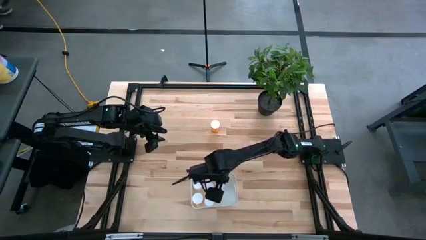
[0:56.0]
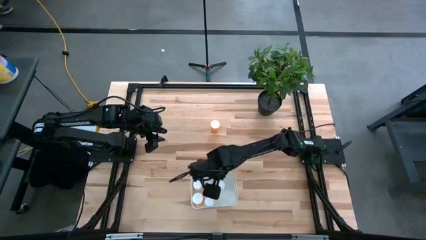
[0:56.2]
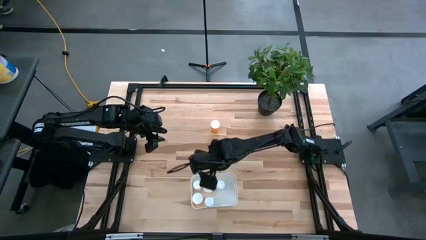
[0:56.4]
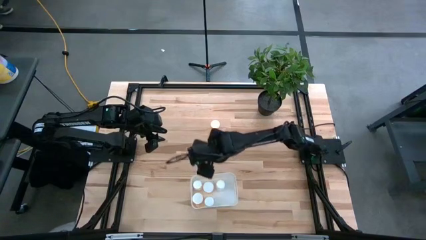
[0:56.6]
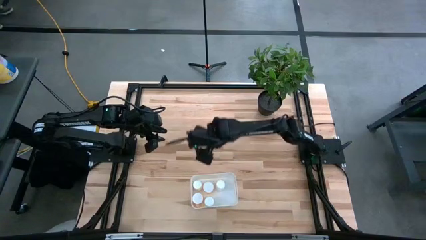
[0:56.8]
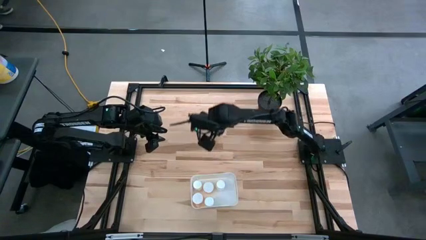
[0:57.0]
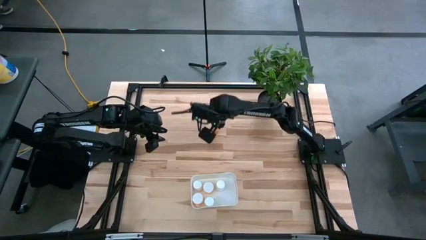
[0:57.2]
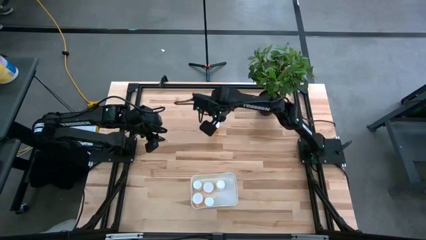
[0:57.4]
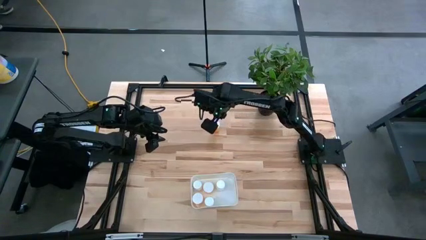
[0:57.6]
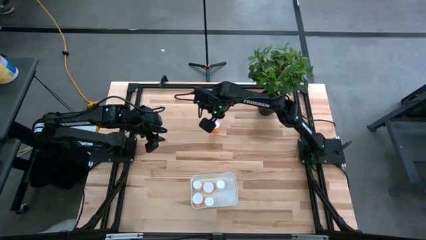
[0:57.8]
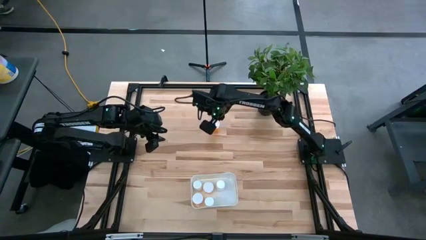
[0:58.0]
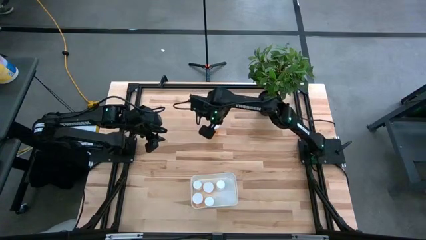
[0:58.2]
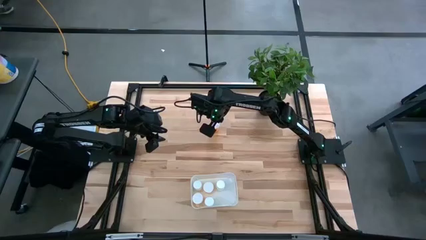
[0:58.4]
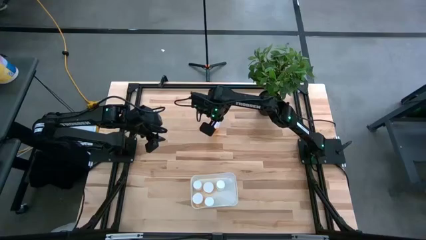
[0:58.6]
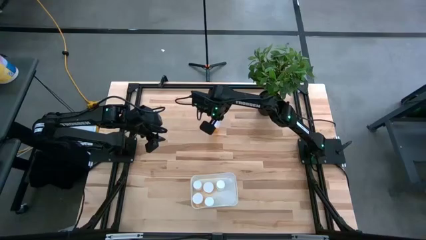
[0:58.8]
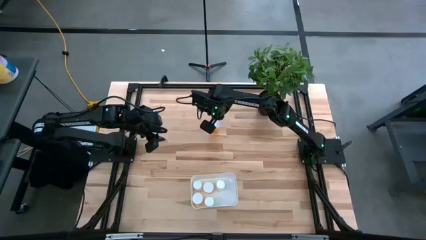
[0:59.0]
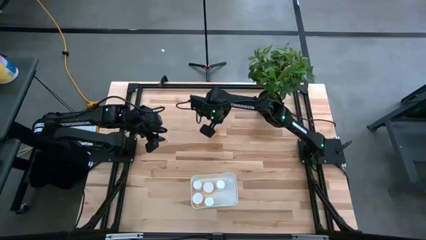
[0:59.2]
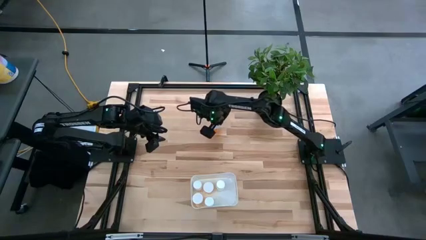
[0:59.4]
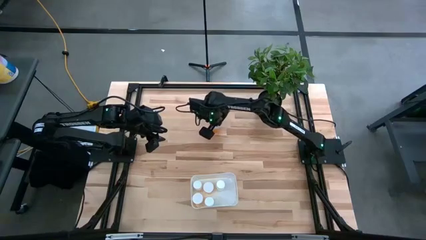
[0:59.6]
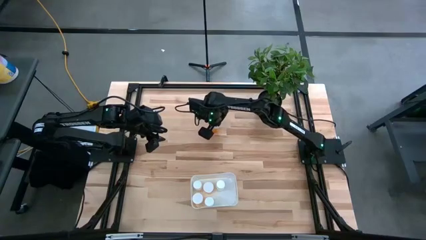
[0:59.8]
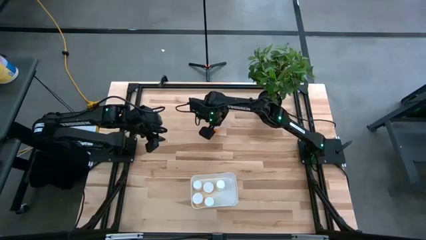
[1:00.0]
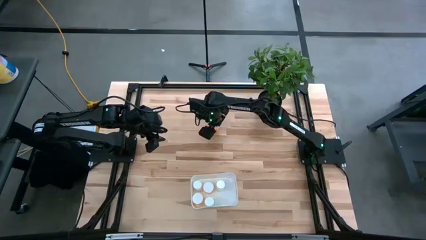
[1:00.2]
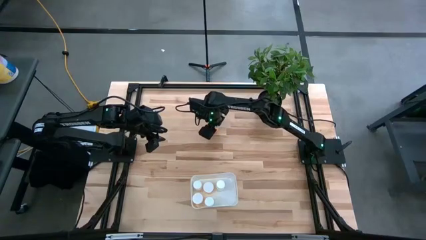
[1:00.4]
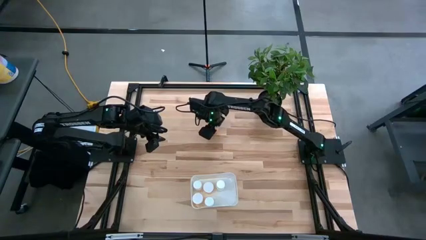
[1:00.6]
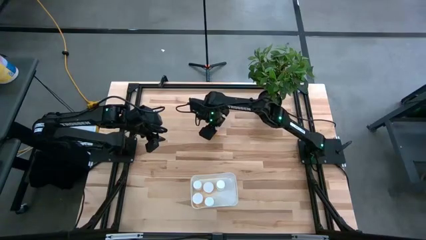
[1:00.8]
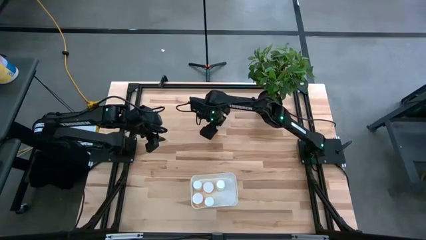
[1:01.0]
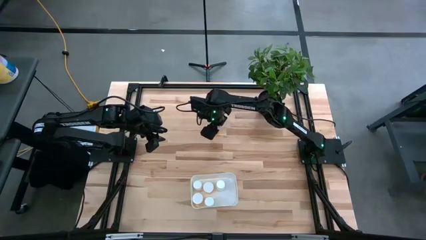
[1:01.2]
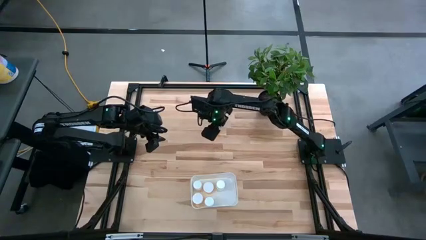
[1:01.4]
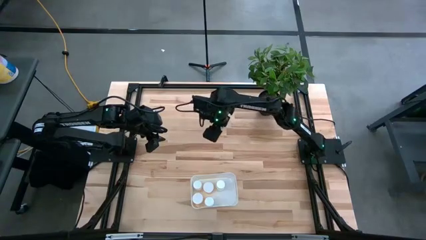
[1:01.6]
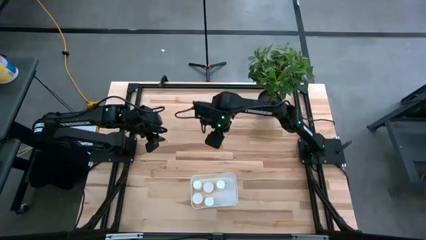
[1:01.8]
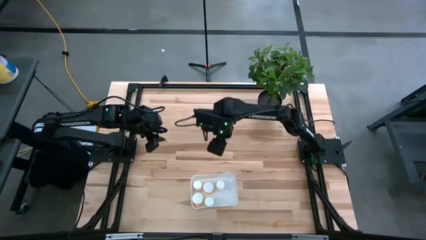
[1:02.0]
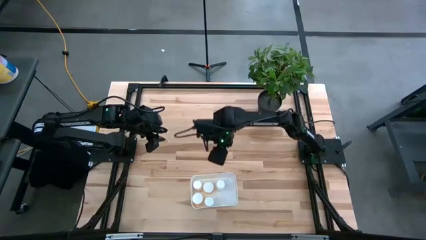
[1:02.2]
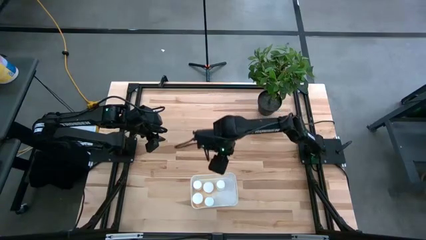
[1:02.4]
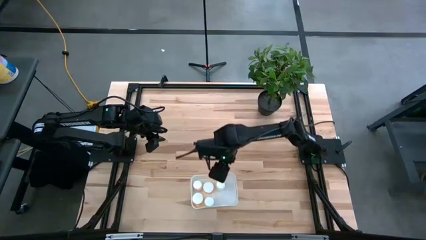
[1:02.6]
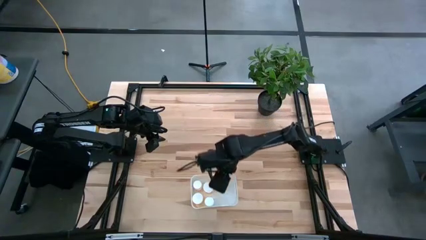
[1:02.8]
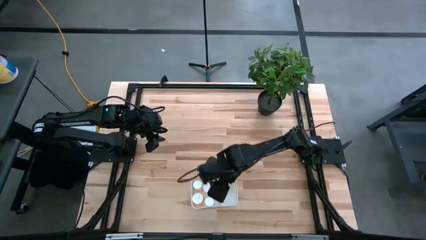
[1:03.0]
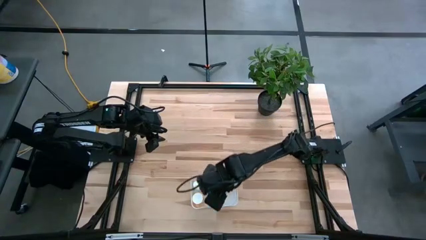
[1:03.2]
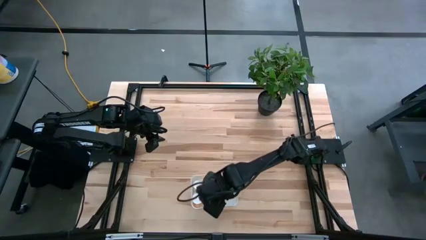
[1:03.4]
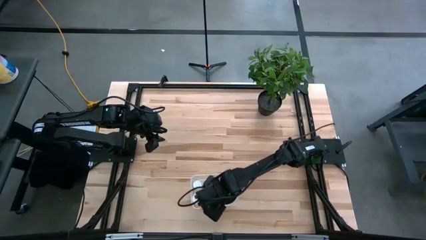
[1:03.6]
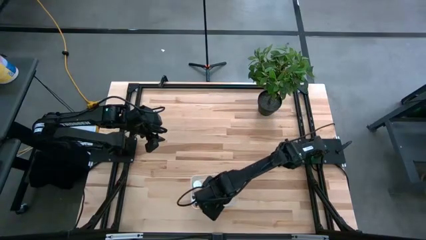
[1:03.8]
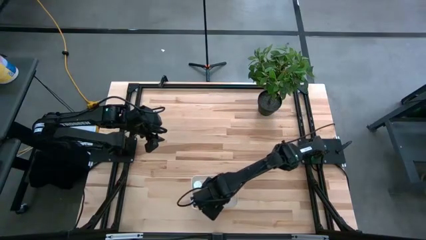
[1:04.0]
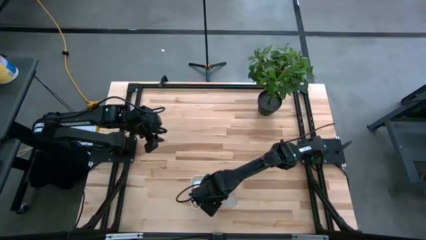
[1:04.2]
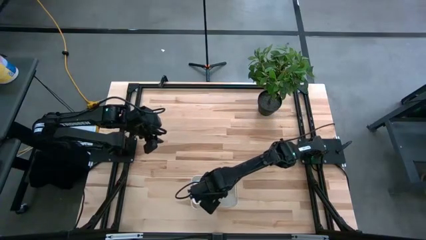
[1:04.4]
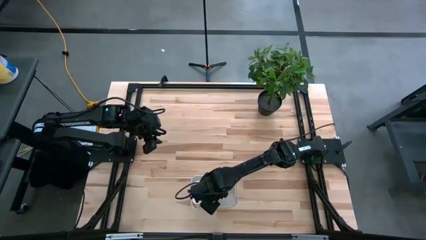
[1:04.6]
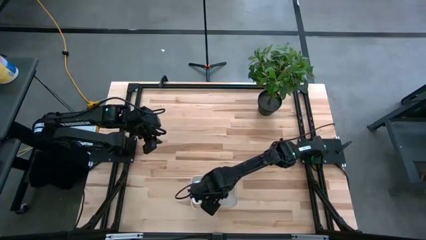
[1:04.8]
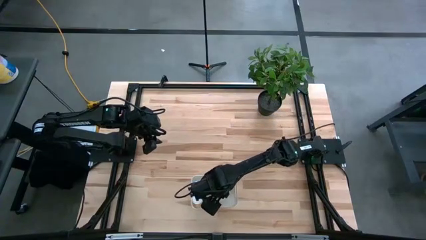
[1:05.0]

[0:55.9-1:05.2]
Task: Pick and place pill bottles into a basket
Put the orange pill bottle in the white bin

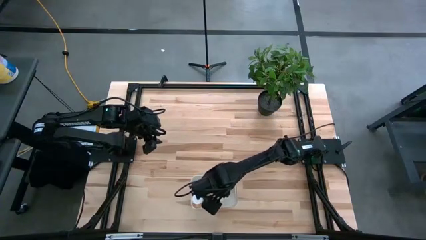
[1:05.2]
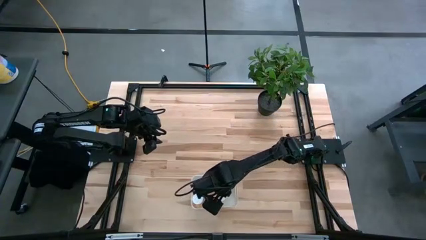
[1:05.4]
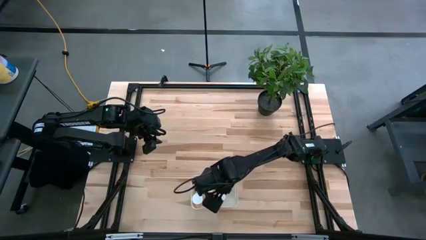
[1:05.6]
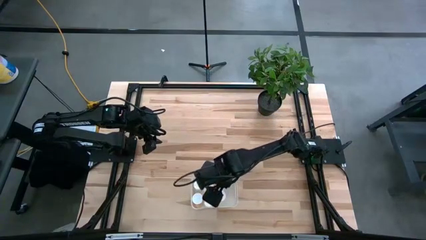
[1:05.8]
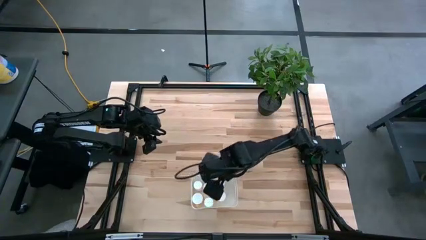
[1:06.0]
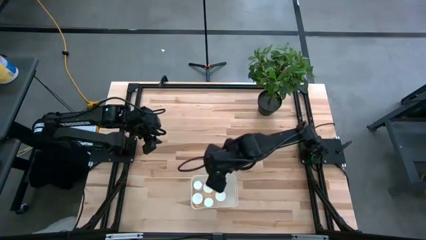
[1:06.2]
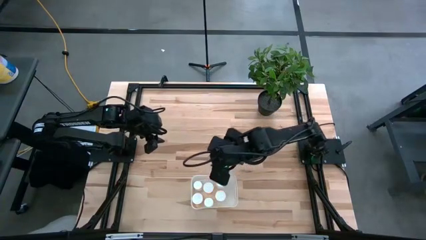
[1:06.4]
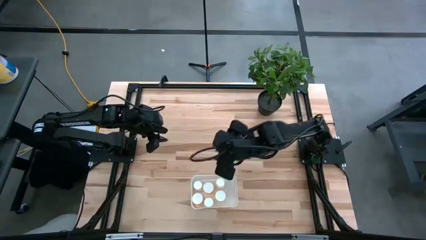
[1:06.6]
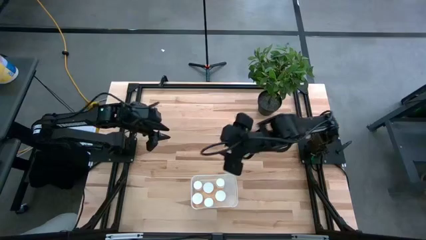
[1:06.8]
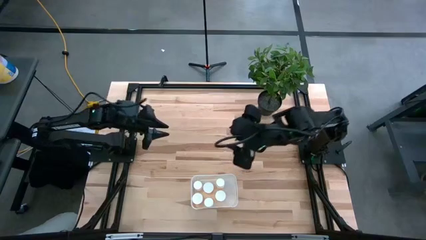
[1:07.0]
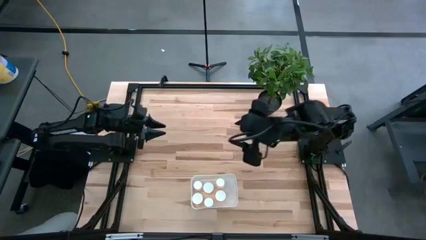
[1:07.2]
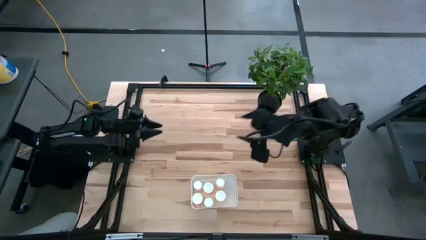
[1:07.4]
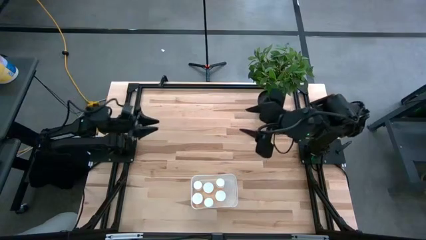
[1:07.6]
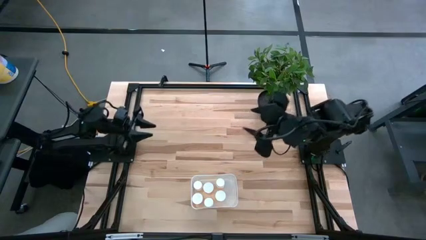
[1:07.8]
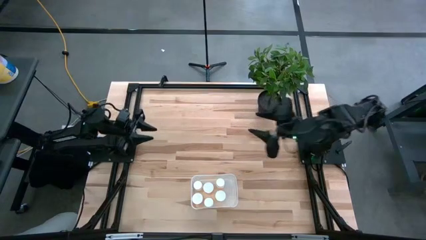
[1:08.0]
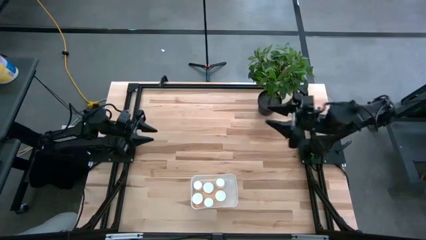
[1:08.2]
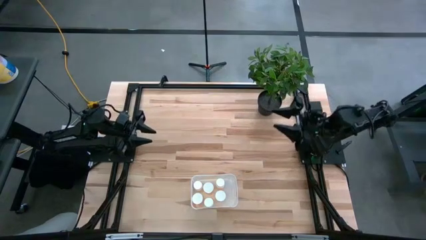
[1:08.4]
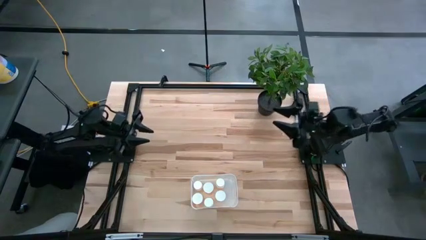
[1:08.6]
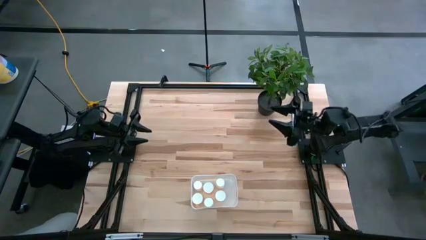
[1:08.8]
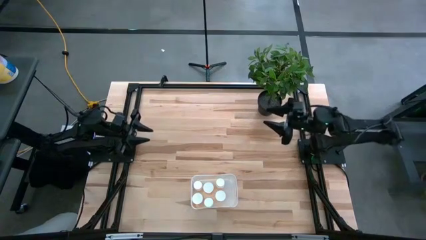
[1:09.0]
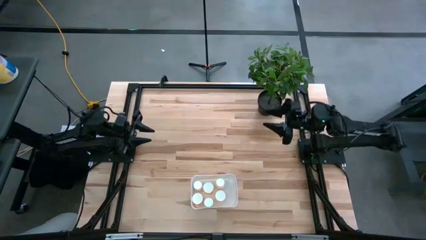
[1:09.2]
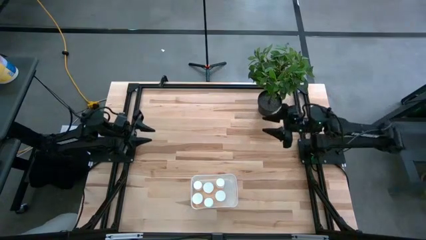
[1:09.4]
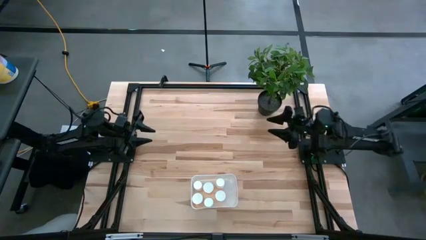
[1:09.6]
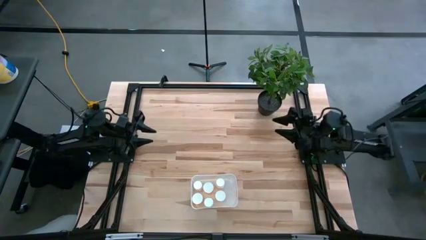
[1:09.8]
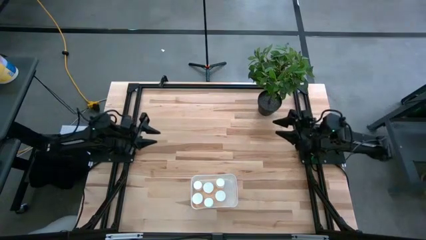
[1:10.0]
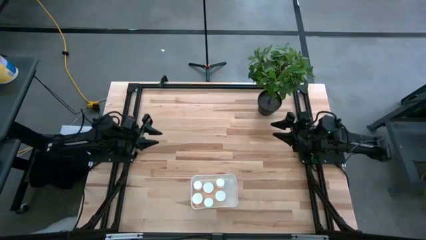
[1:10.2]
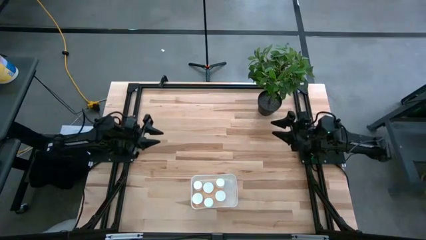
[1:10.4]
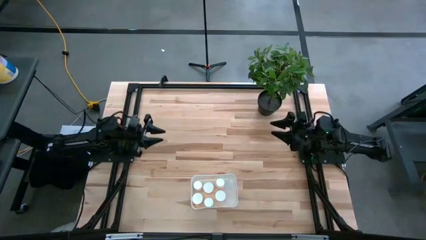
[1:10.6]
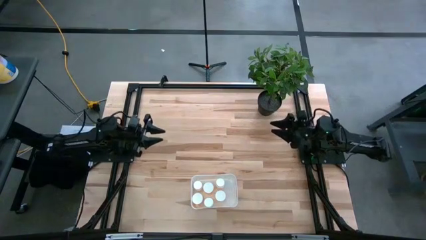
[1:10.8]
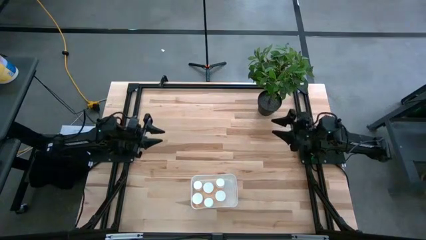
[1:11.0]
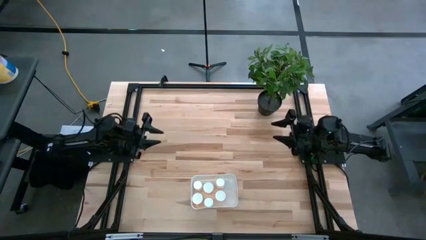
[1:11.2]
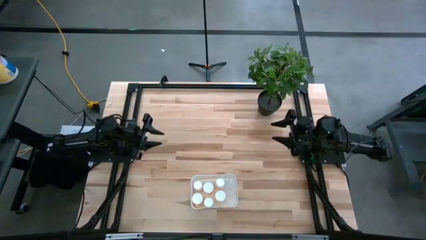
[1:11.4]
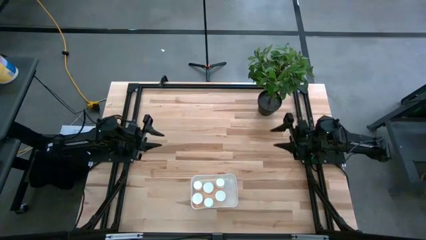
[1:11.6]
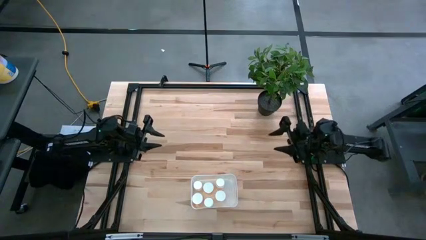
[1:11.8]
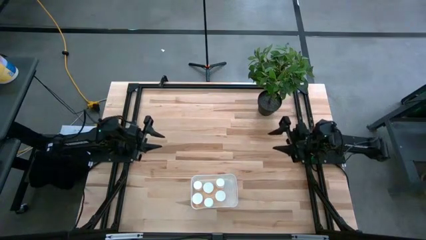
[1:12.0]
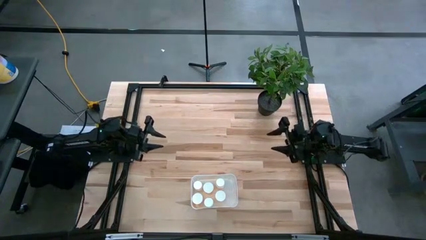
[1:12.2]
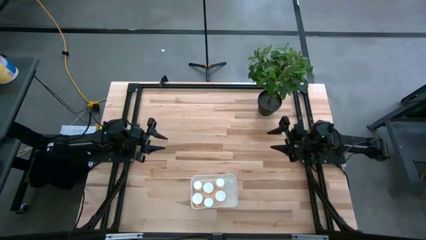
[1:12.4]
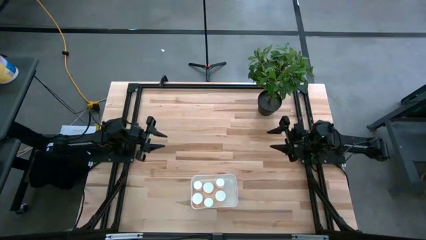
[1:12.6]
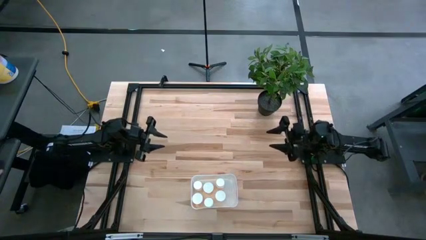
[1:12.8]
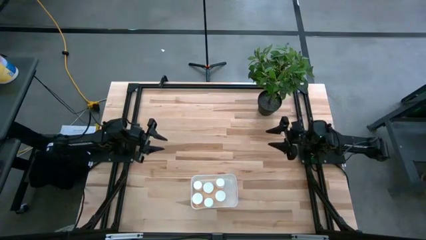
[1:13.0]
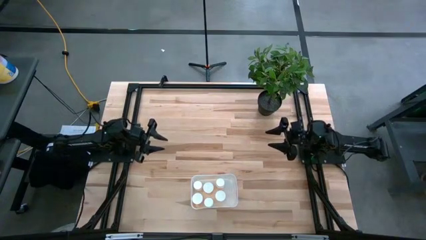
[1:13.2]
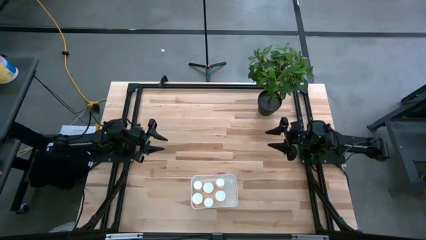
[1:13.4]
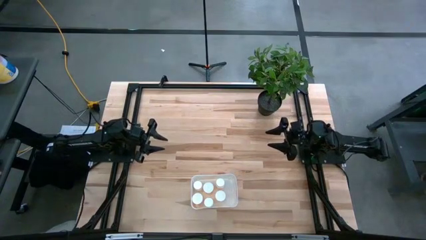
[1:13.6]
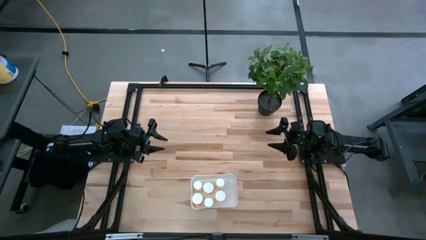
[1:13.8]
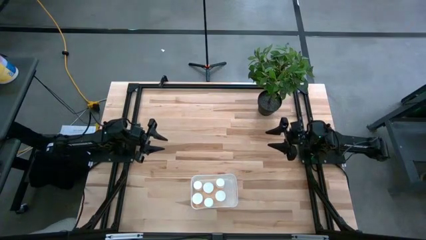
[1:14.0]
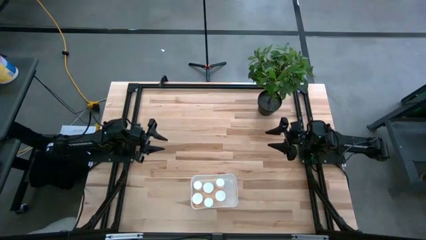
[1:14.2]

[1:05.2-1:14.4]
Return to Home Position
